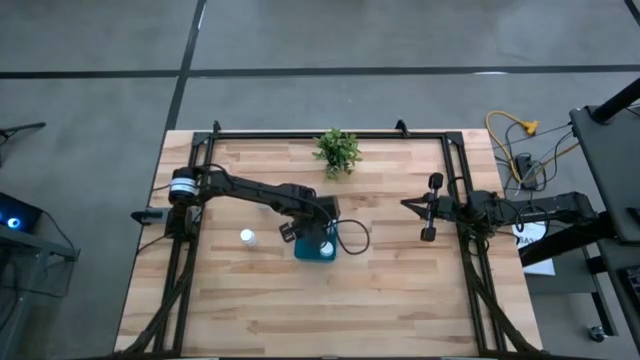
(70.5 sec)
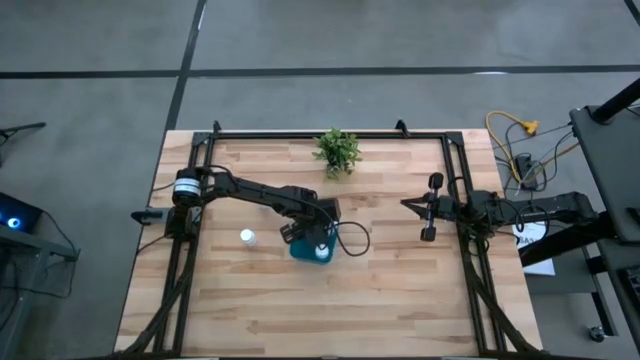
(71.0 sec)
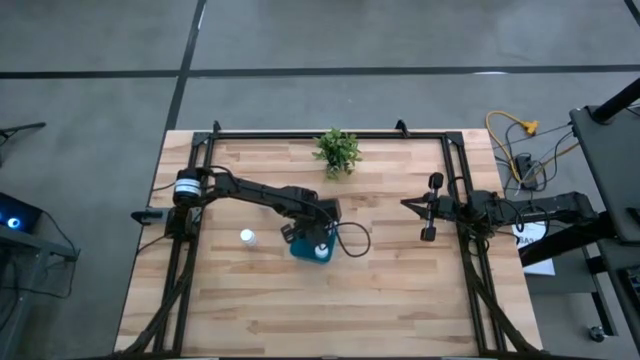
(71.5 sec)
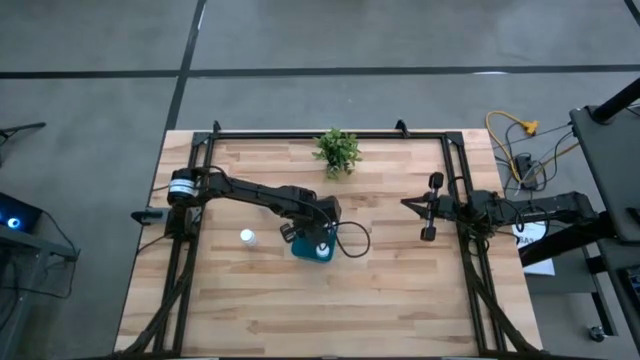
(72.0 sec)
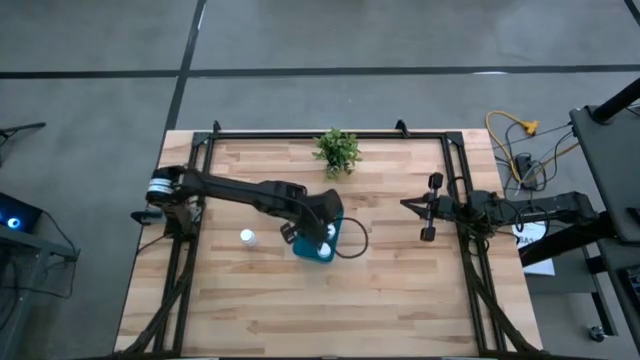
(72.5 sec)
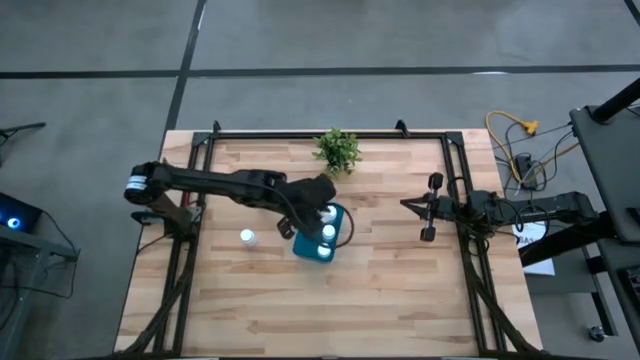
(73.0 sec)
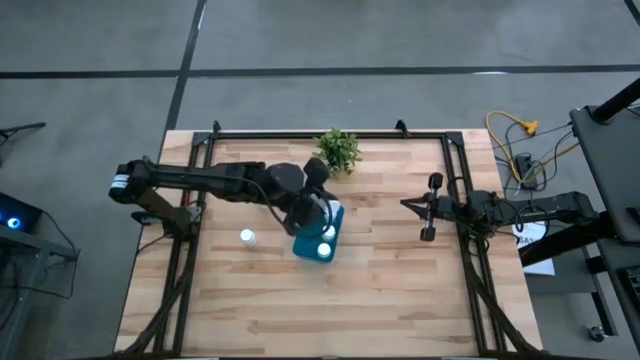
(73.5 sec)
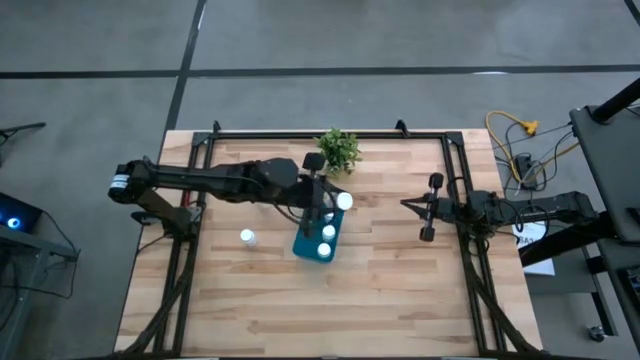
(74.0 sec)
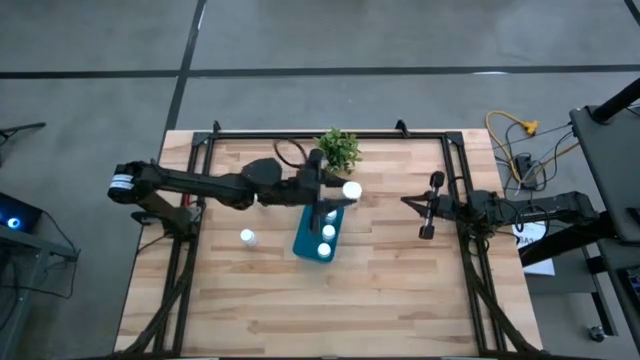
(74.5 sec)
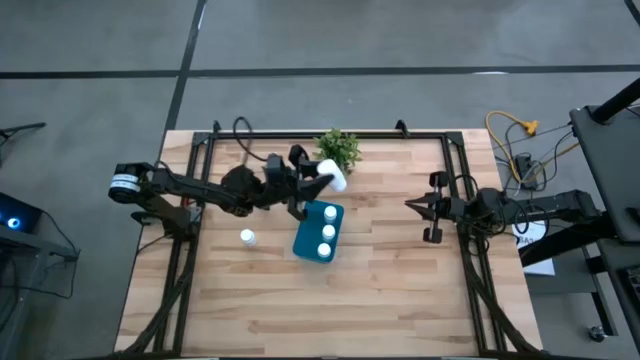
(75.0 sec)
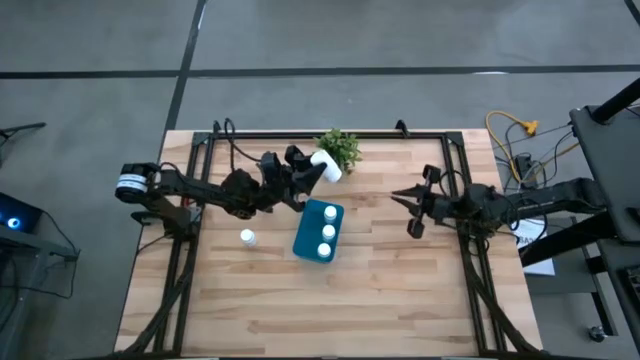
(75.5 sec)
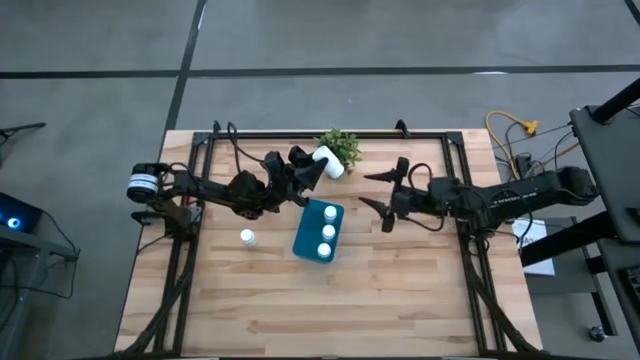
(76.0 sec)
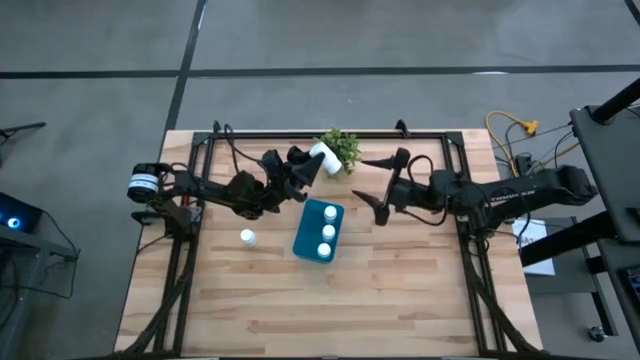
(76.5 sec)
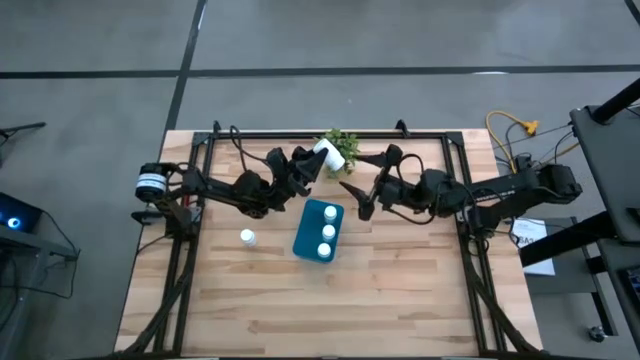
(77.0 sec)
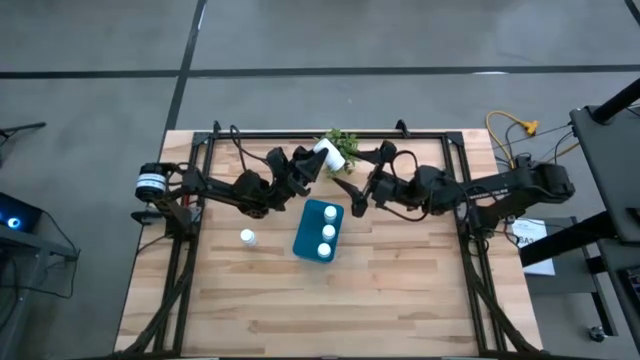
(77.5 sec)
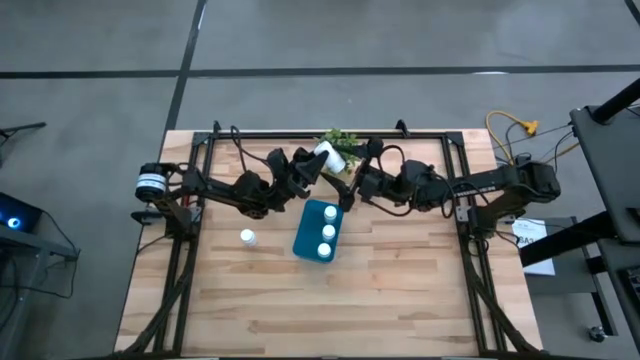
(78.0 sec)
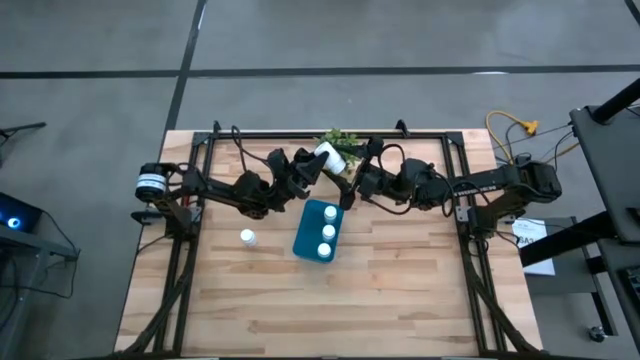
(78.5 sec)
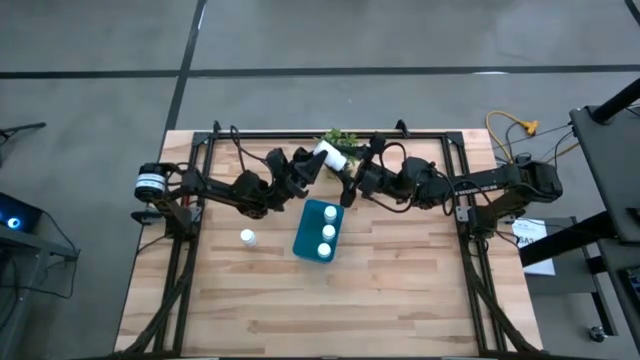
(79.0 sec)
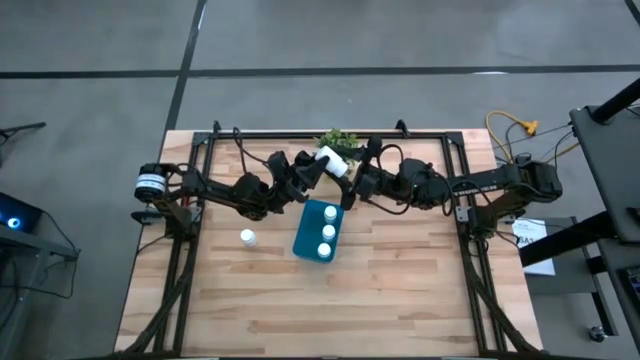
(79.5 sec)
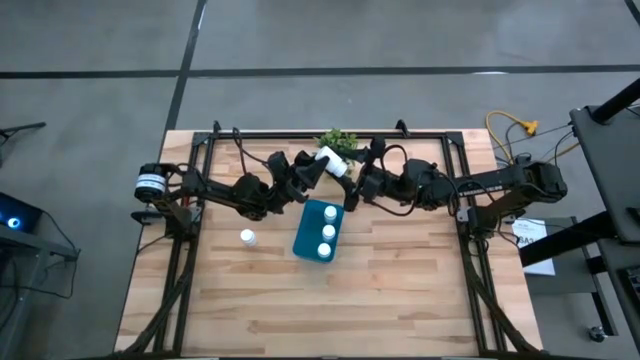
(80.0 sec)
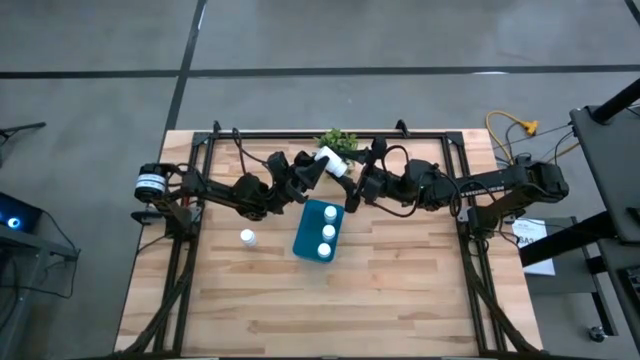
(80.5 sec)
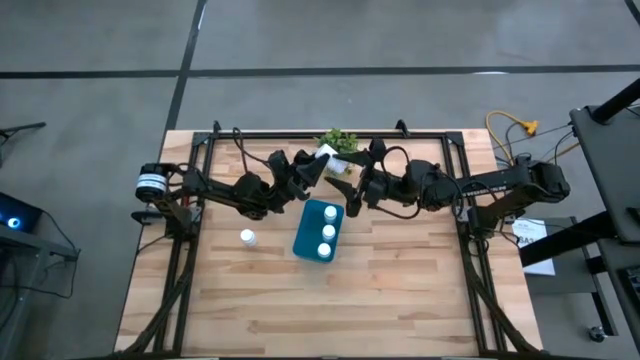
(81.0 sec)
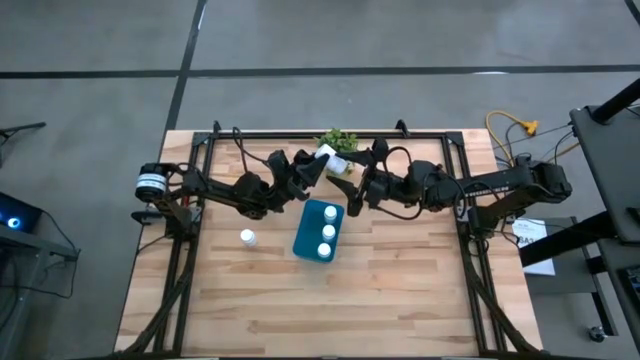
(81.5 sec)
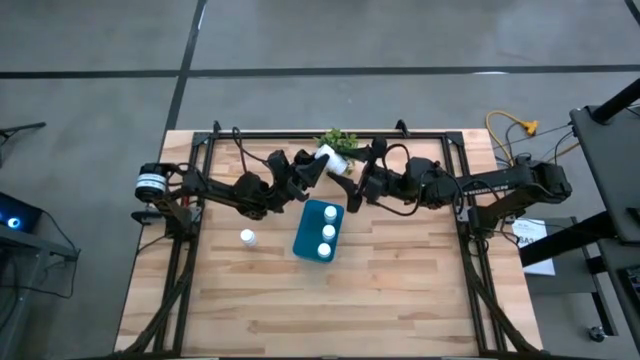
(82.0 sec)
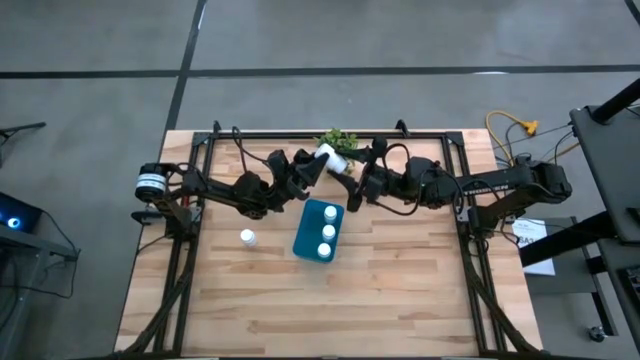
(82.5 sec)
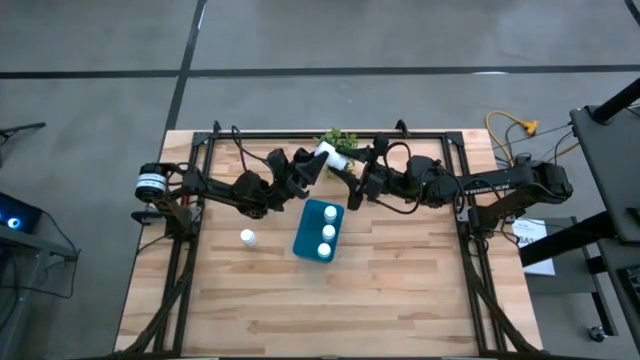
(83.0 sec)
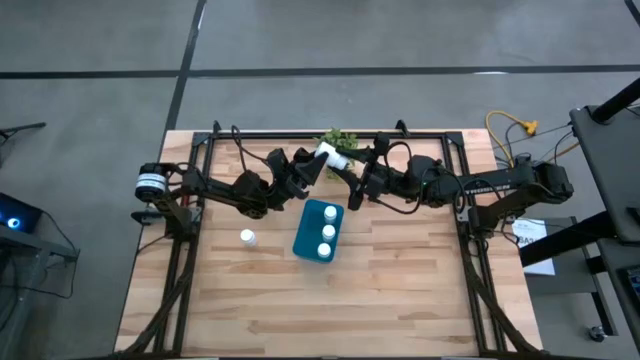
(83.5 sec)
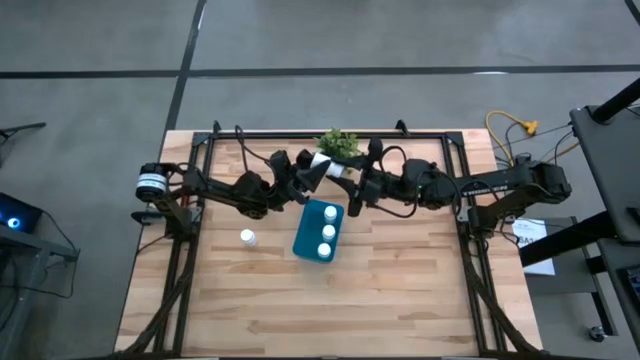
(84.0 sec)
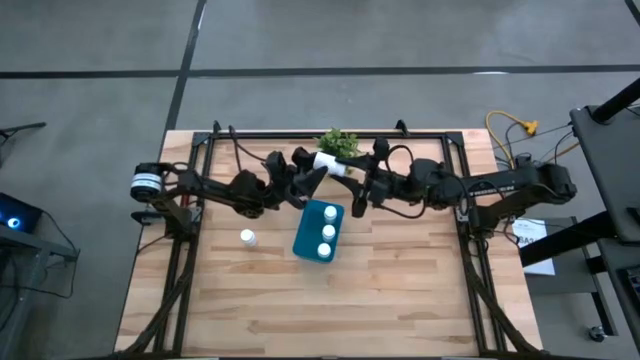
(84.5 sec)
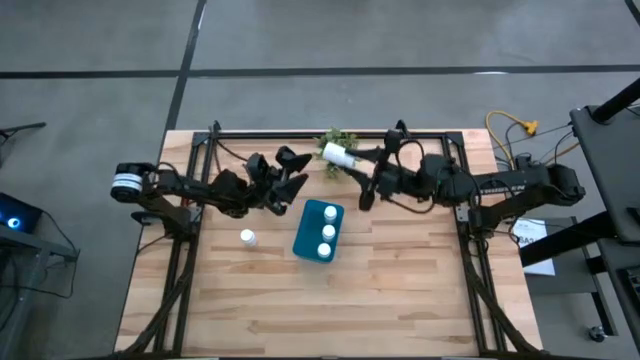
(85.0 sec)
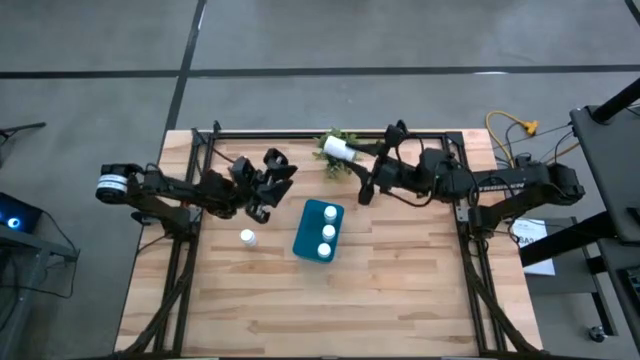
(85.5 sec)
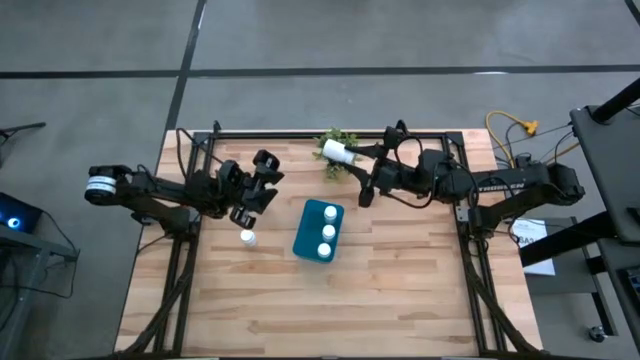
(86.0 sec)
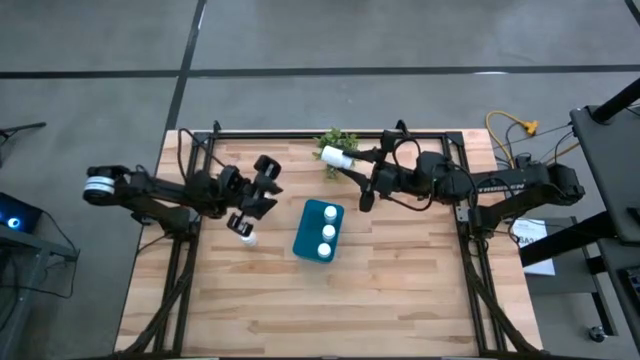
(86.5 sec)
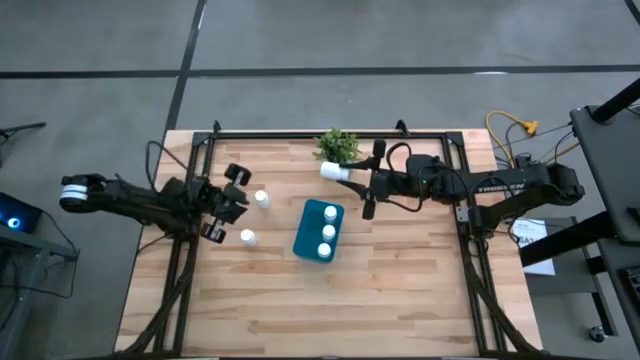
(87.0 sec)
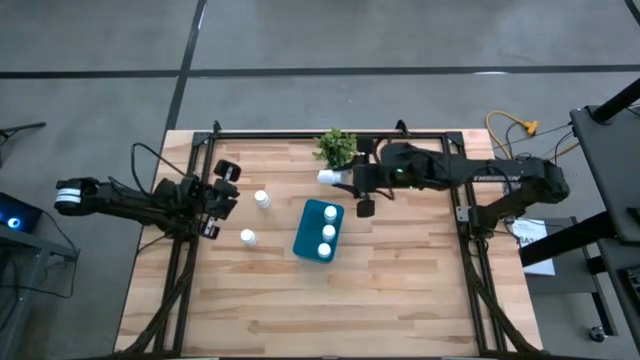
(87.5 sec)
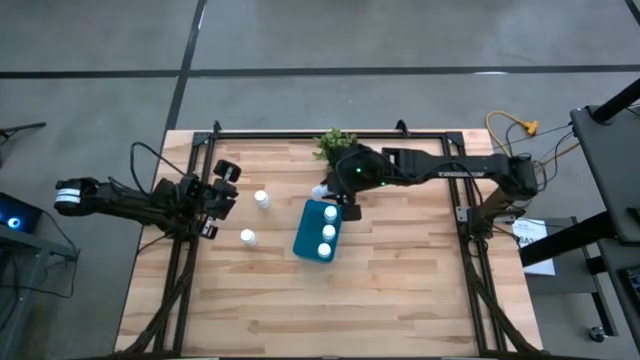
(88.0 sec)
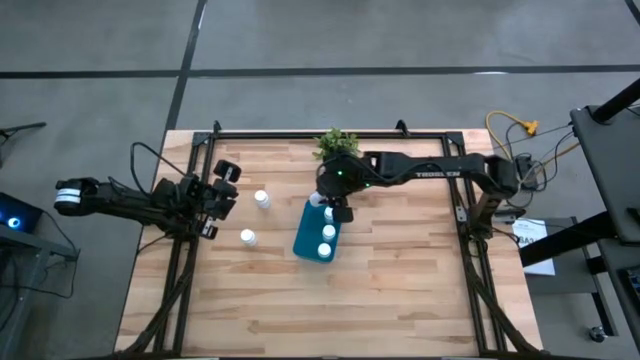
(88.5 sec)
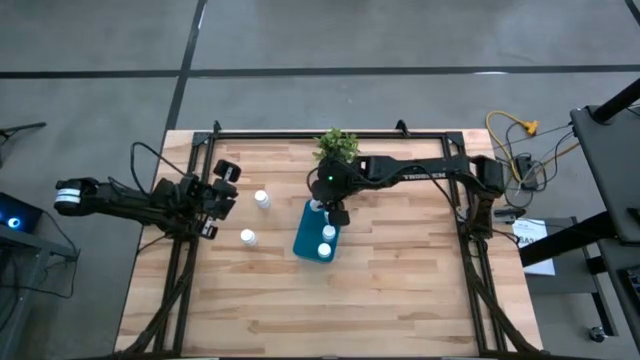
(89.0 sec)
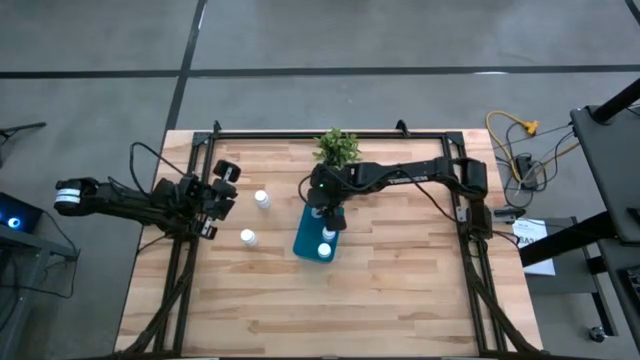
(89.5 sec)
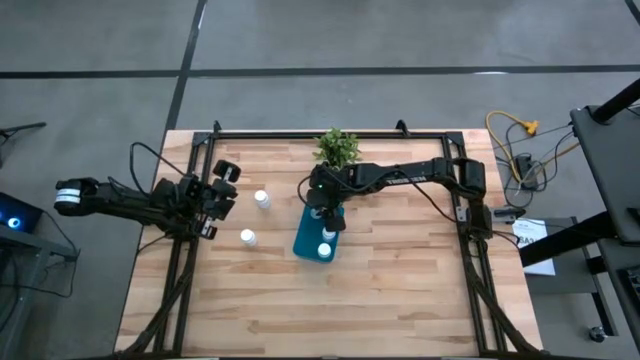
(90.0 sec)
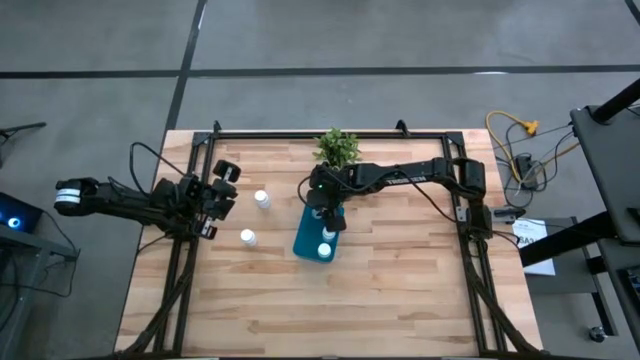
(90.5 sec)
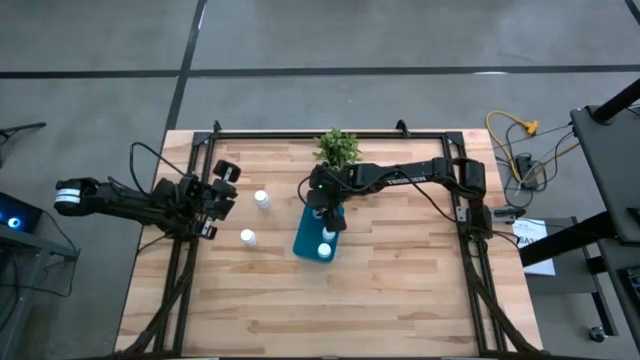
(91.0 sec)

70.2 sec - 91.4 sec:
Task: Pick and place pill bottles into a basket
Put the white medicine bottle into the blue bin
